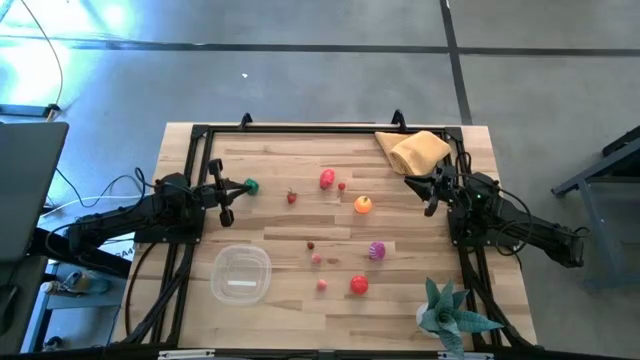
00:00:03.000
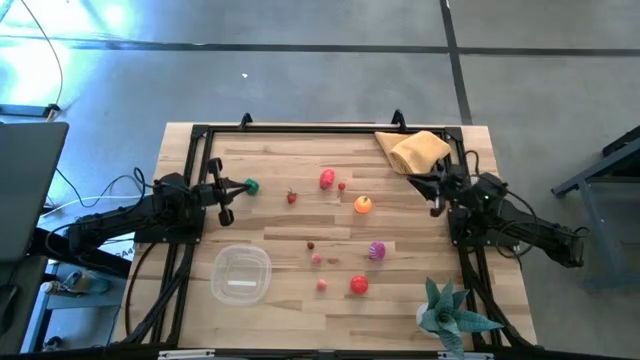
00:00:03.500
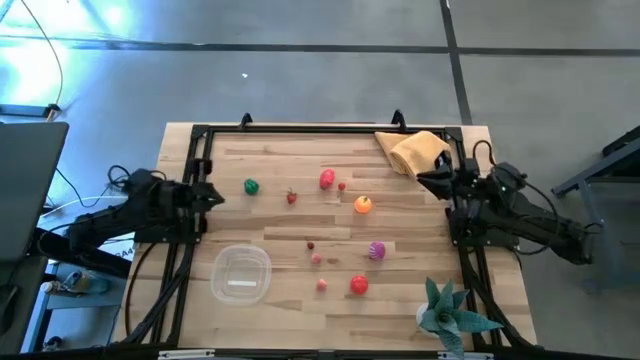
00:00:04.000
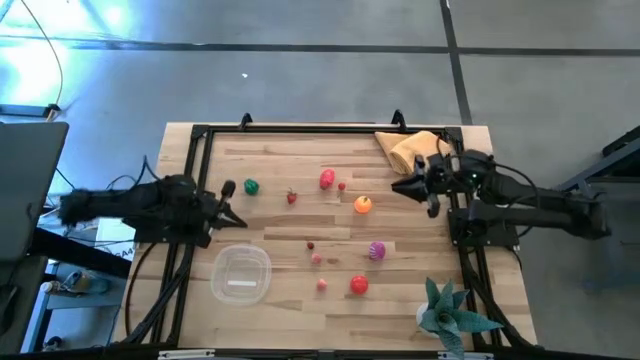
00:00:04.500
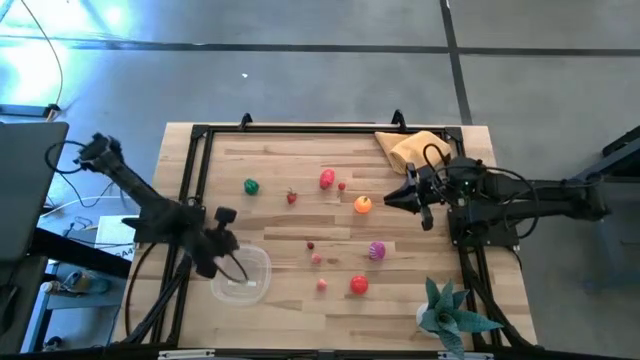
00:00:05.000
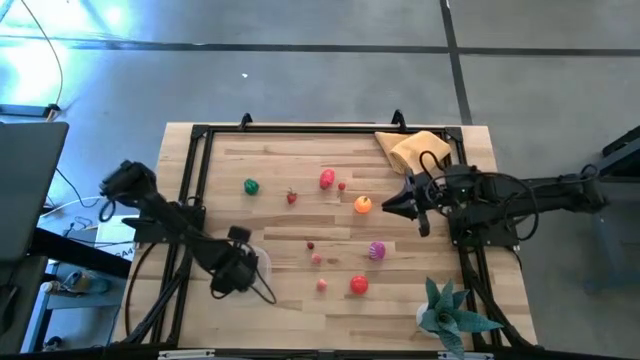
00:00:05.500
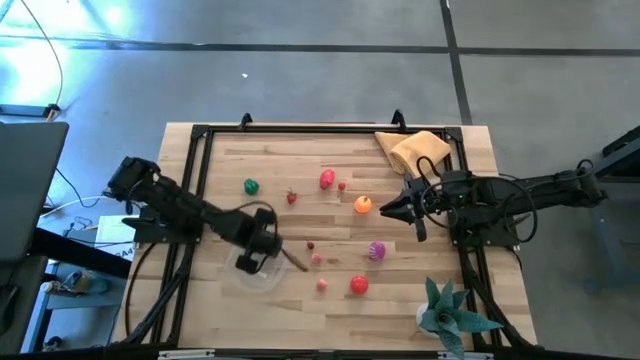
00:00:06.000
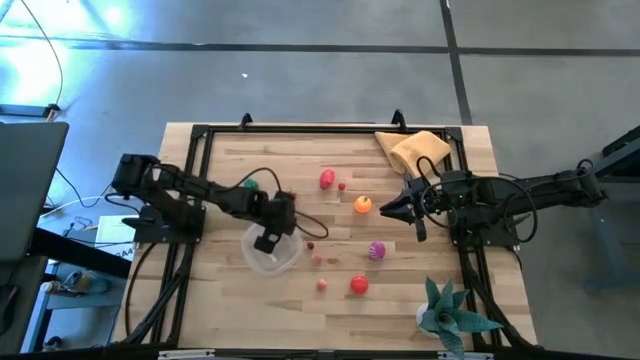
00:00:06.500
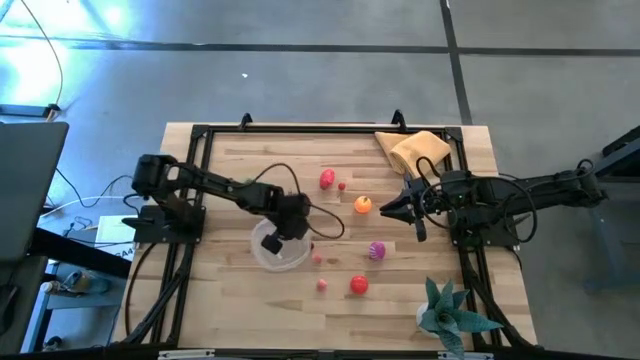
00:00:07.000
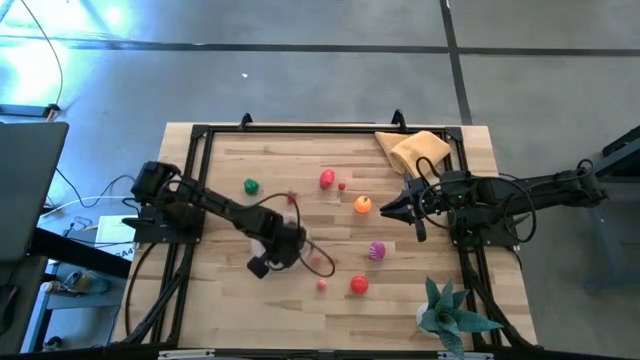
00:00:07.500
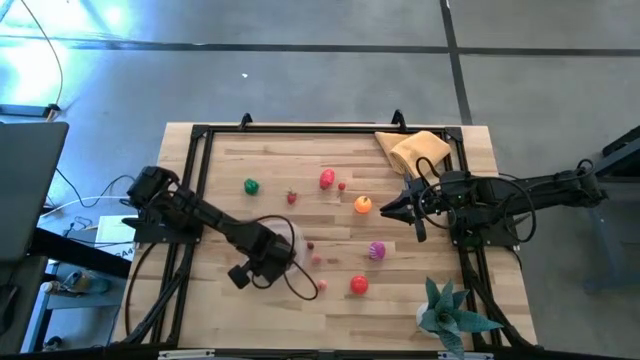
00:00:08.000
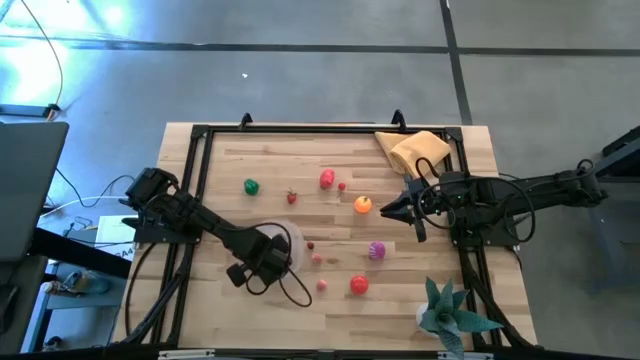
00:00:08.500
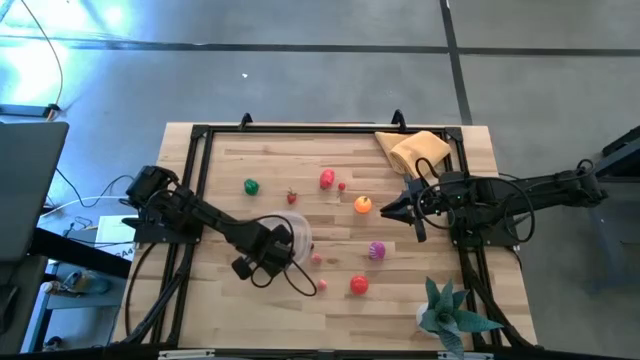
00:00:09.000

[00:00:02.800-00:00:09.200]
Task: Pick and placing Produce into tupperware
Move the transparent container to the middle left of the table

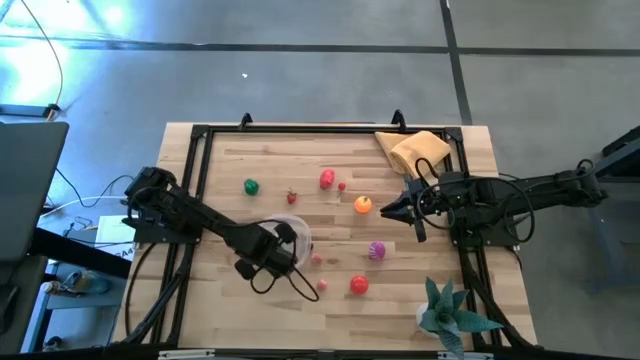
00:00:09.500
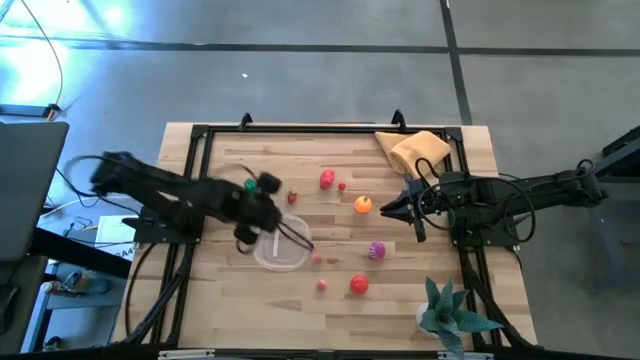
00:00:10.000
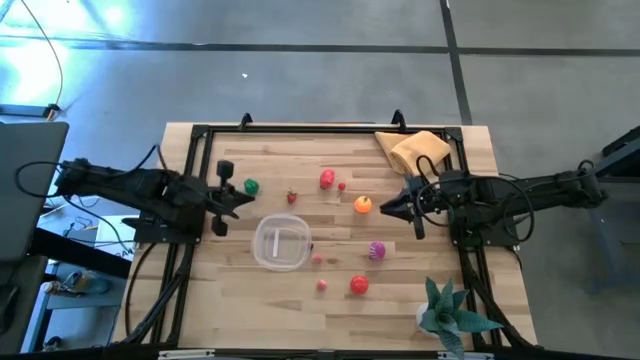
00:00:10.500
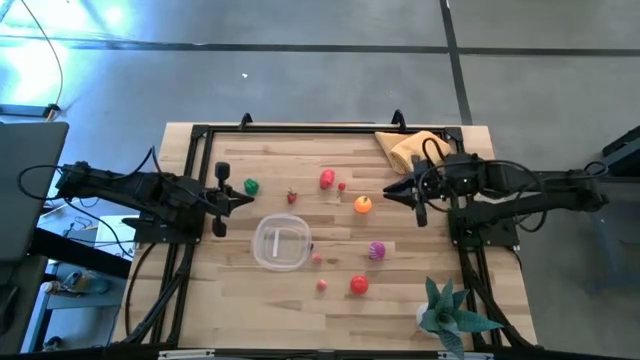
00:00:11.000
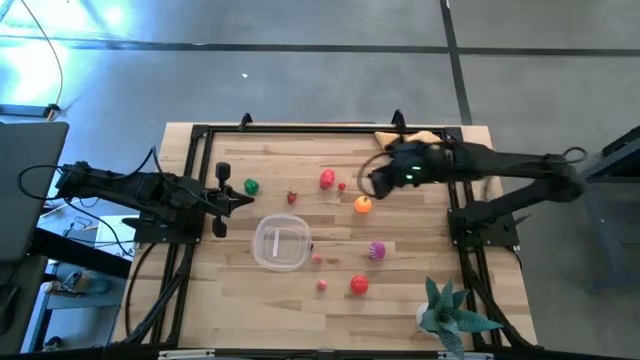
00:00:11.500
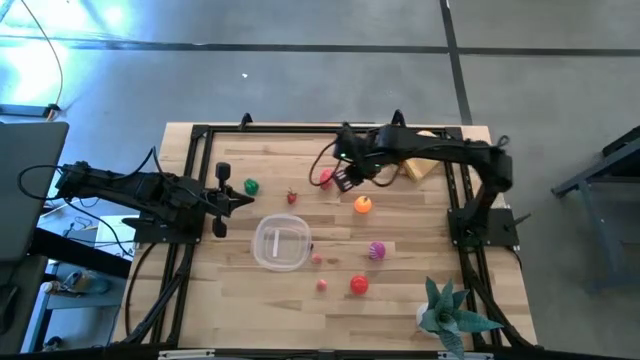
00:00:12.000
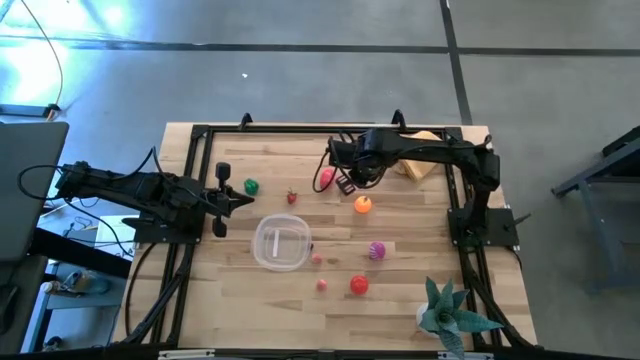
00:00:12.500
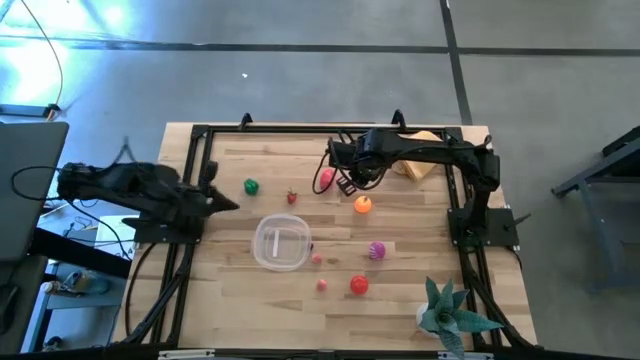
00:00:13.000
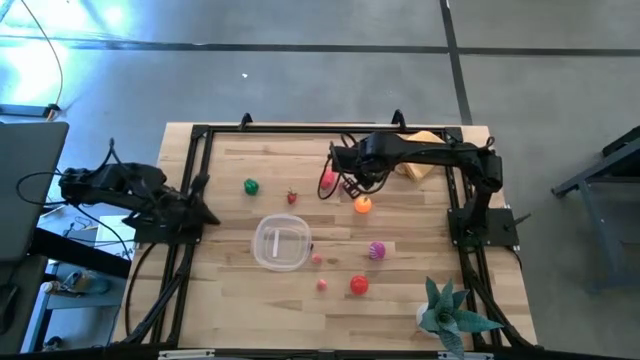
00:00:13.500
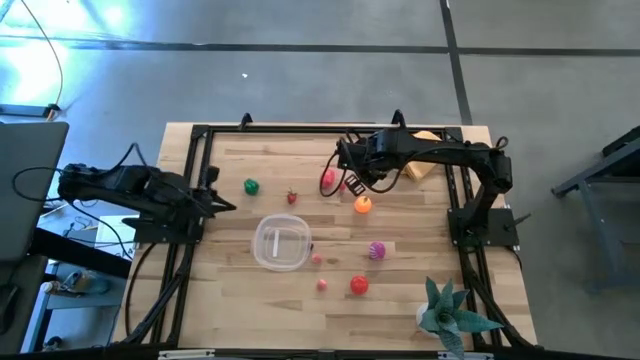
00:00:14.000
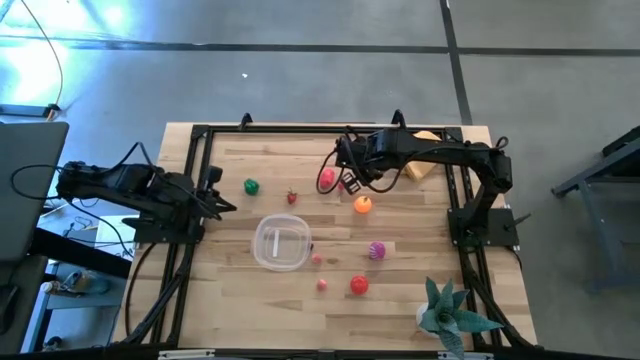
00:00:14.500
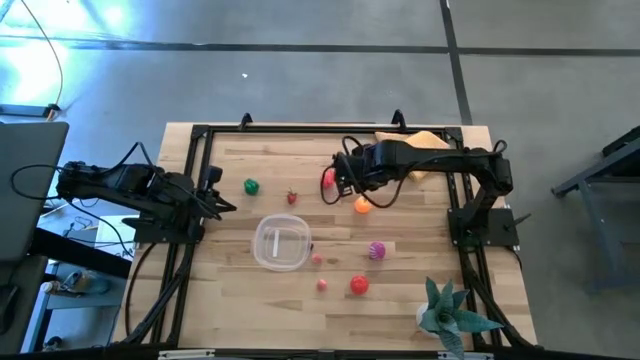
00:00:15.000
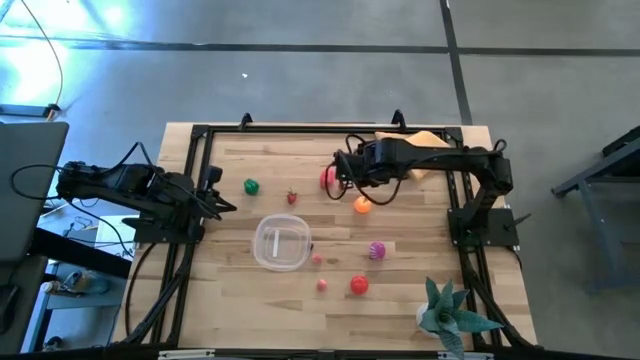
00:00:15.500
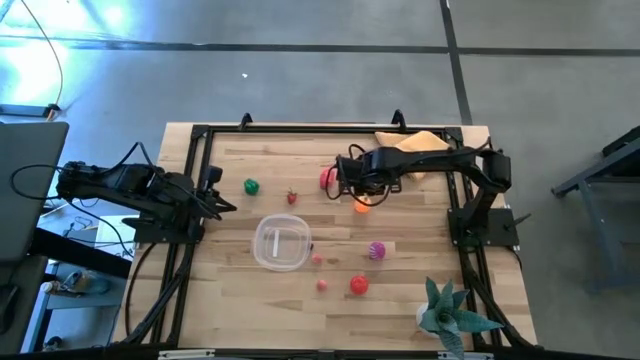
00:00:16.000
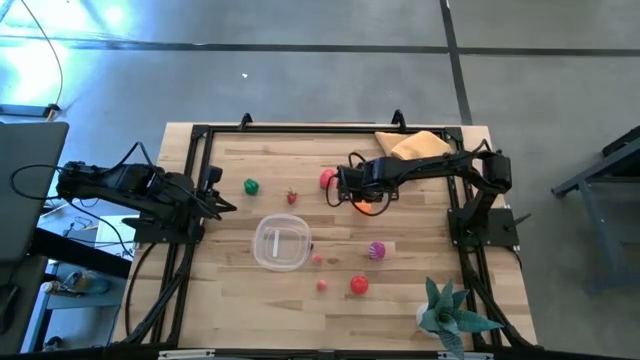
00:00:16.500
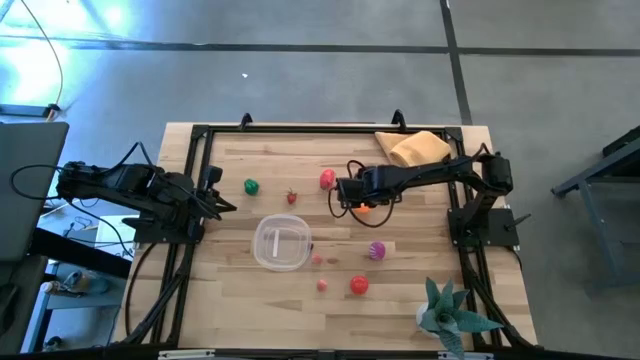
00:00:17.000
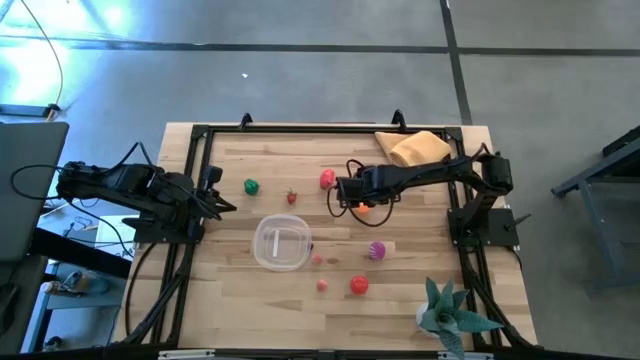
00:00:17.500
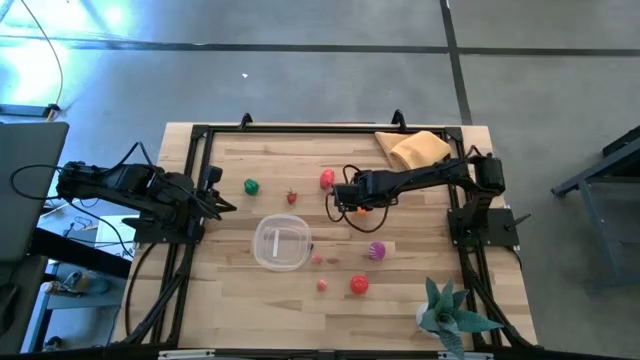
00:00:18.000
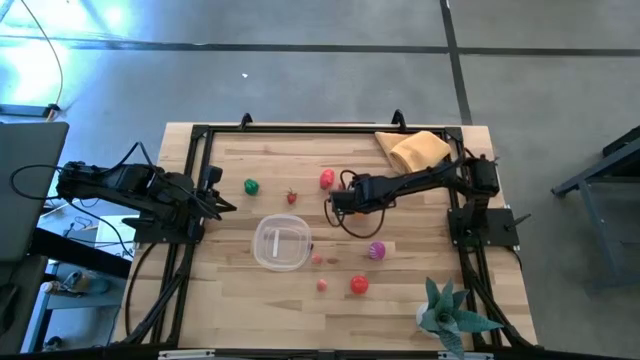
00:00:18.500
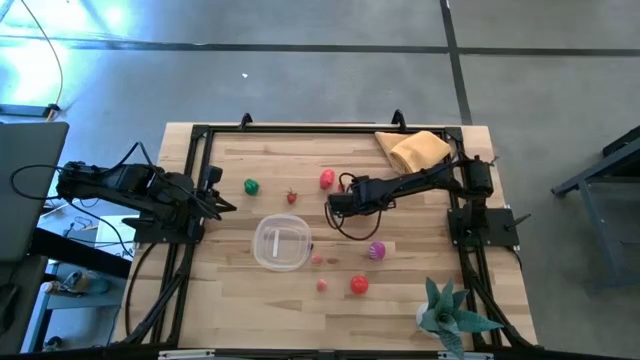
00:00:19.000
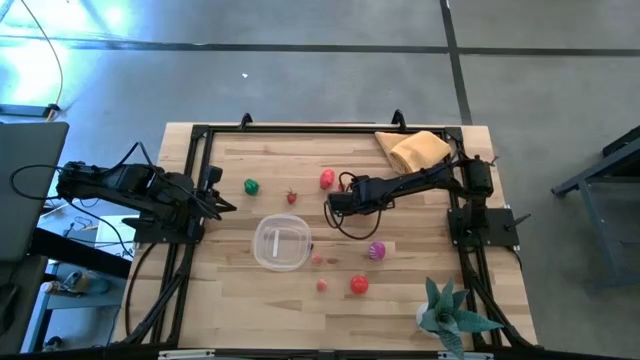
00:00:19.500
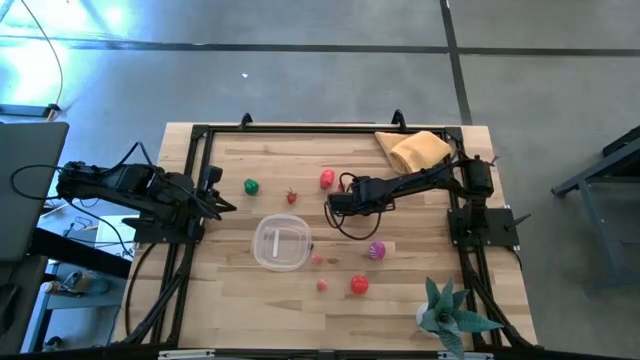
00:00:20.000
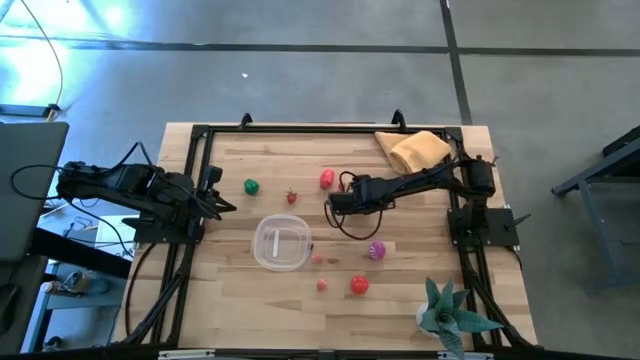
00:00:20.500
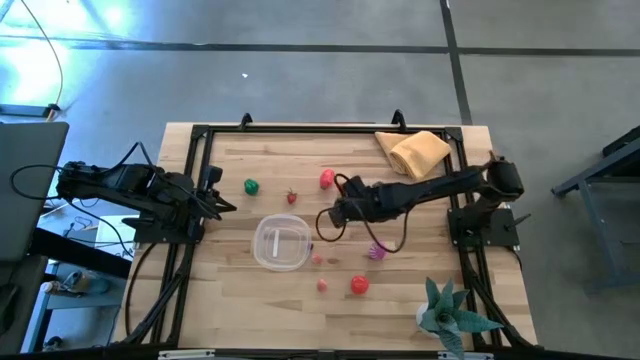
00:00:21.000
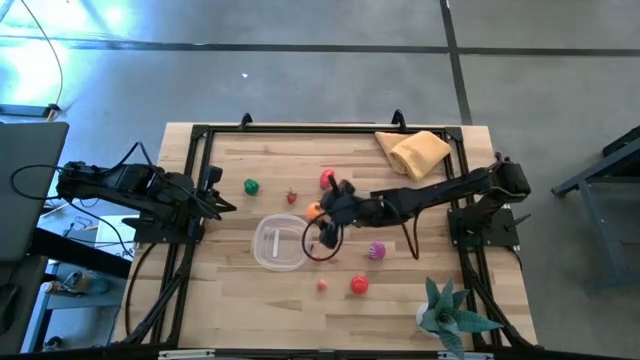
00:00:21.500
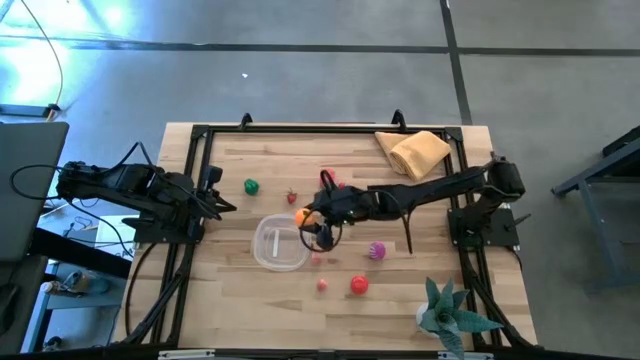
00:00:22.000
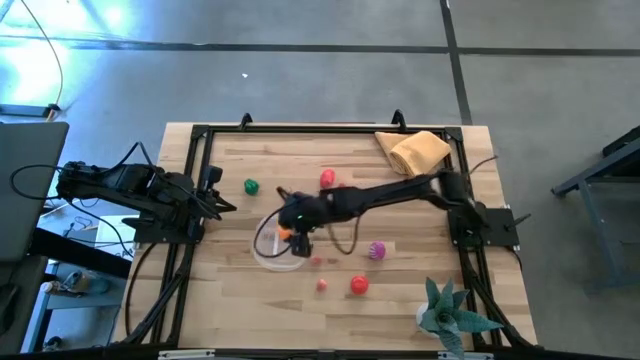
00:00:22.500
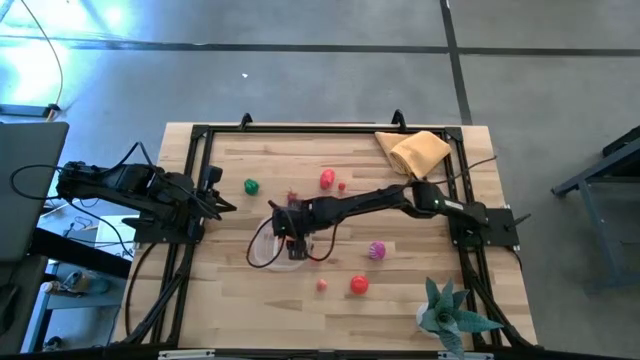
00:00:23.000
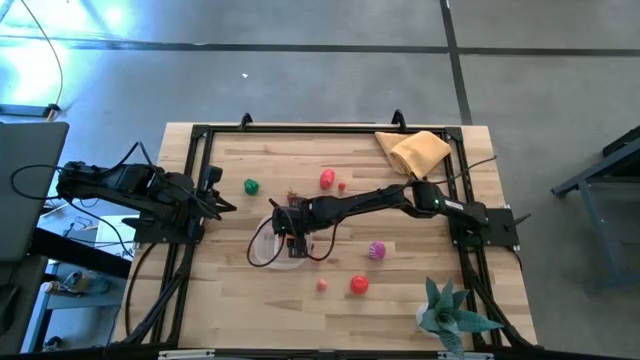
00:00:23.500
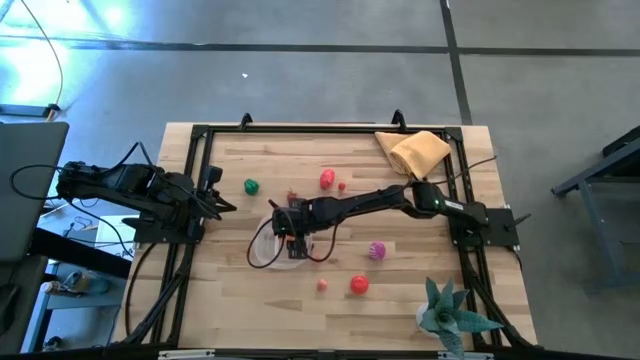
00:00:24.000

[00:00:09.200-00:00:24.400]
Put the orange into the transparent container
